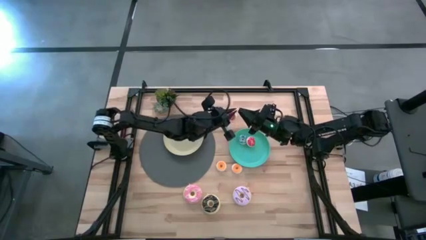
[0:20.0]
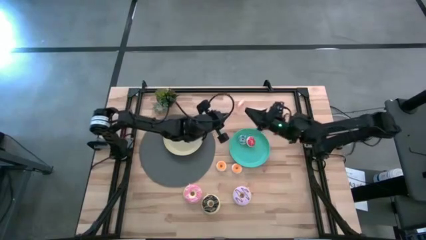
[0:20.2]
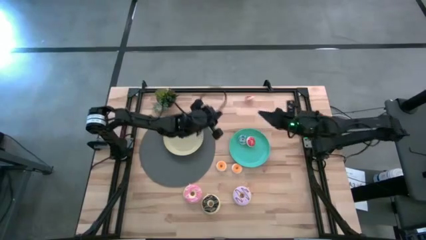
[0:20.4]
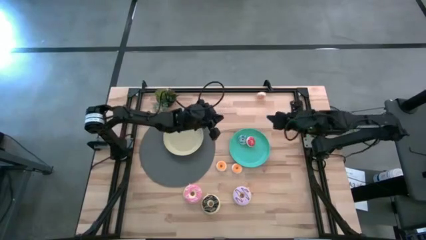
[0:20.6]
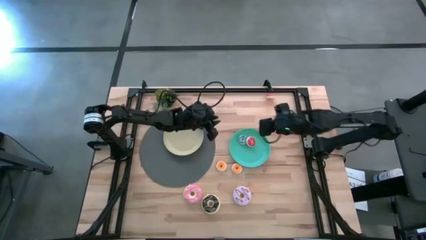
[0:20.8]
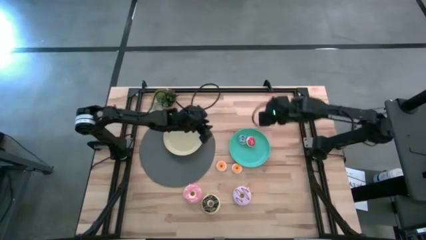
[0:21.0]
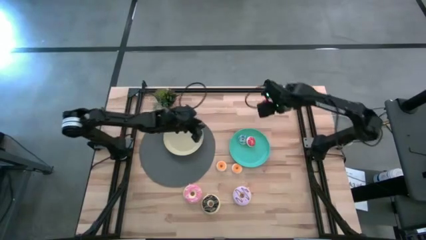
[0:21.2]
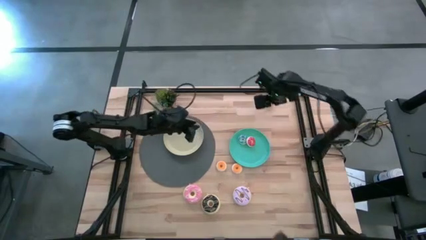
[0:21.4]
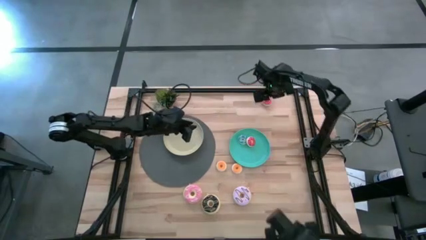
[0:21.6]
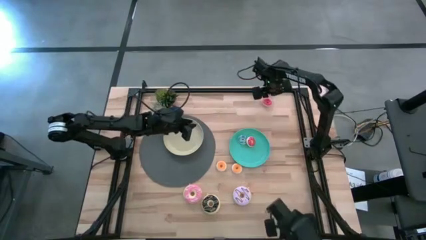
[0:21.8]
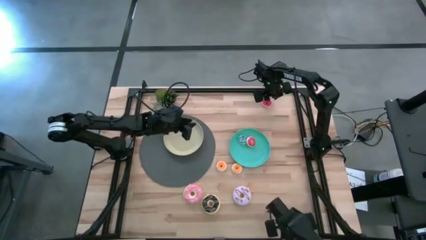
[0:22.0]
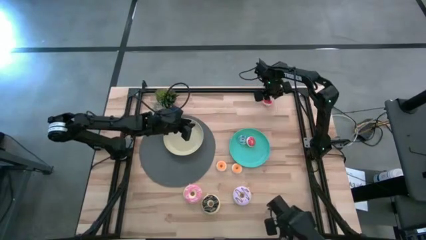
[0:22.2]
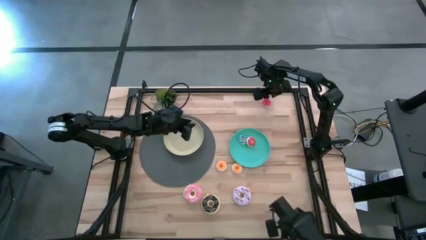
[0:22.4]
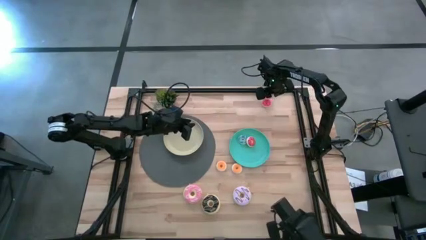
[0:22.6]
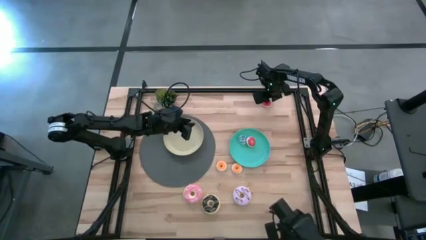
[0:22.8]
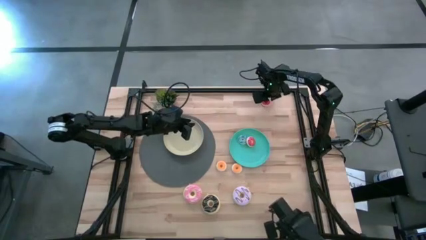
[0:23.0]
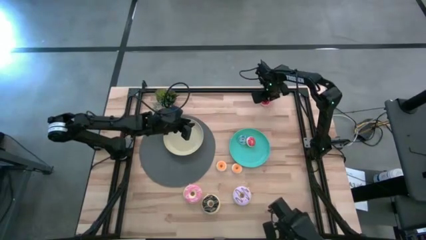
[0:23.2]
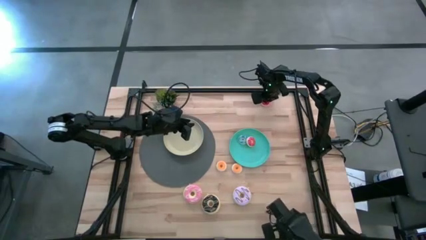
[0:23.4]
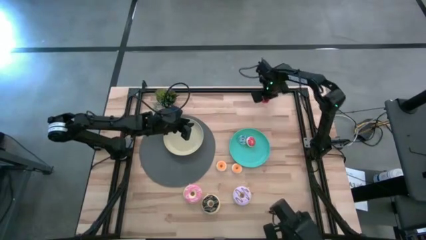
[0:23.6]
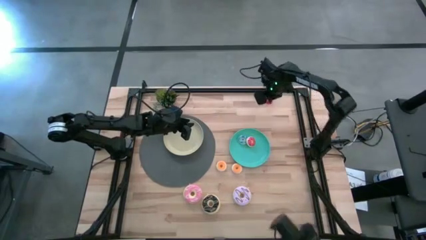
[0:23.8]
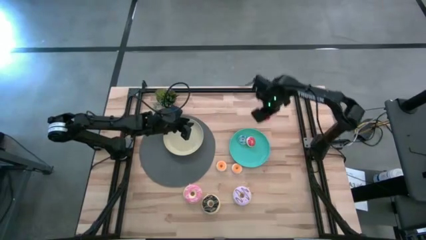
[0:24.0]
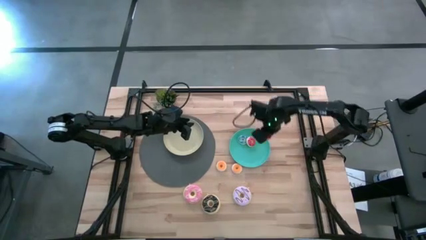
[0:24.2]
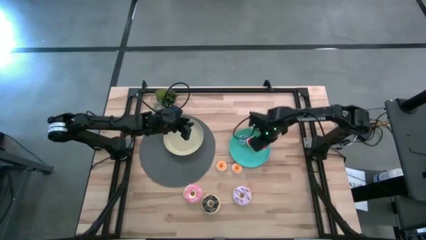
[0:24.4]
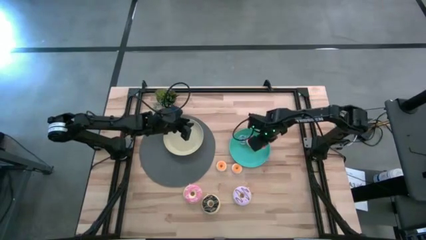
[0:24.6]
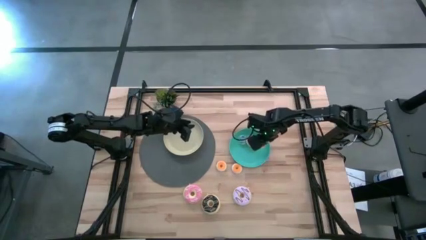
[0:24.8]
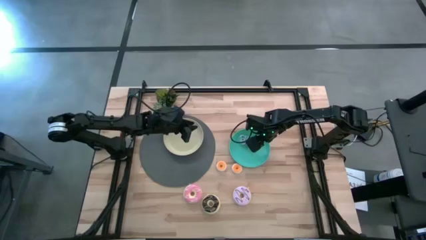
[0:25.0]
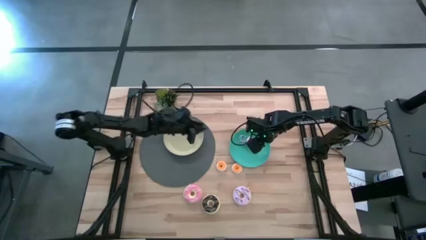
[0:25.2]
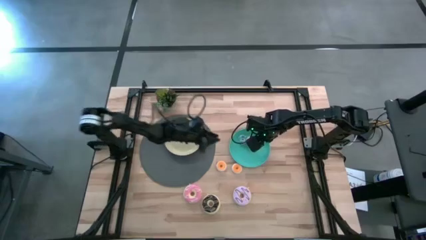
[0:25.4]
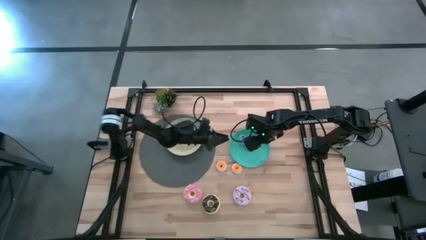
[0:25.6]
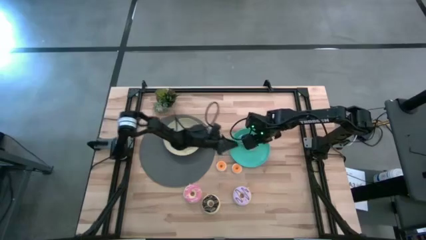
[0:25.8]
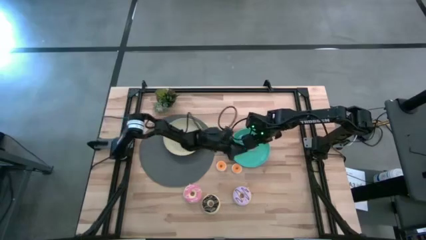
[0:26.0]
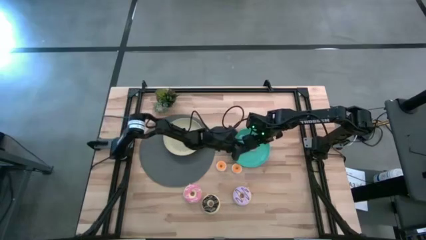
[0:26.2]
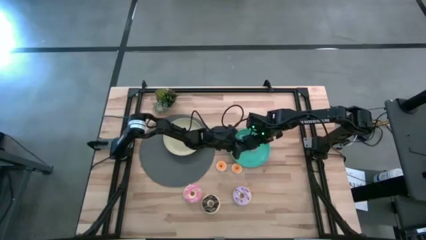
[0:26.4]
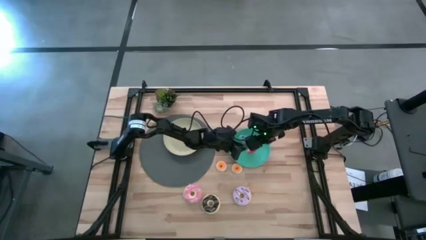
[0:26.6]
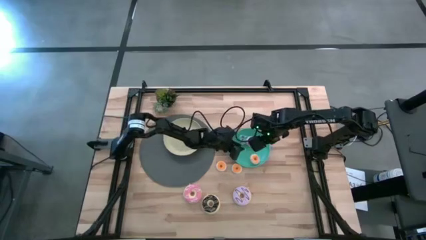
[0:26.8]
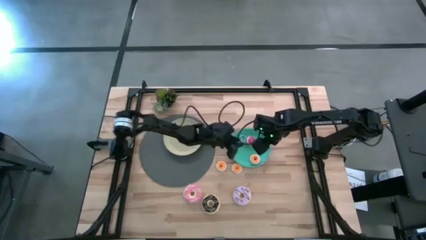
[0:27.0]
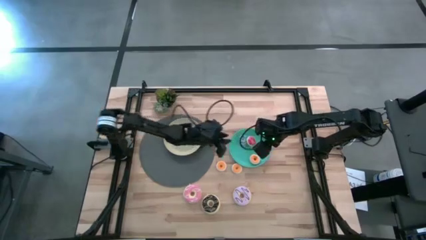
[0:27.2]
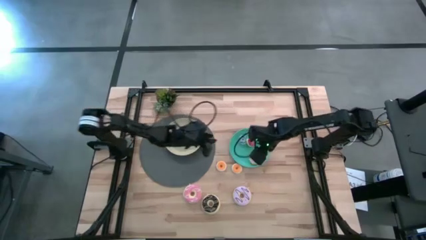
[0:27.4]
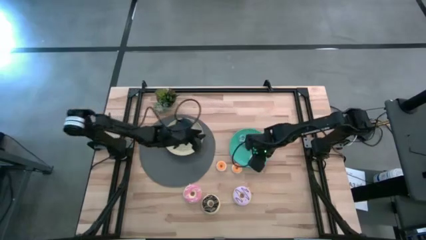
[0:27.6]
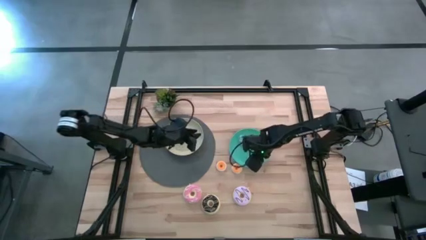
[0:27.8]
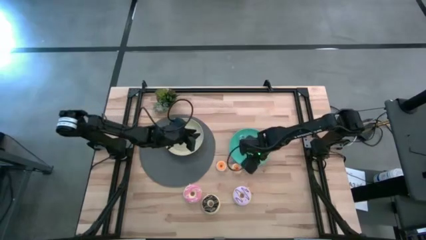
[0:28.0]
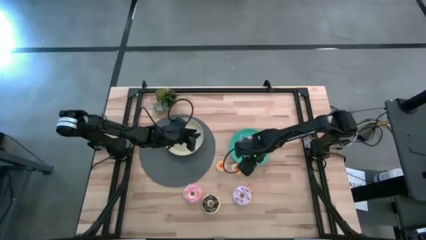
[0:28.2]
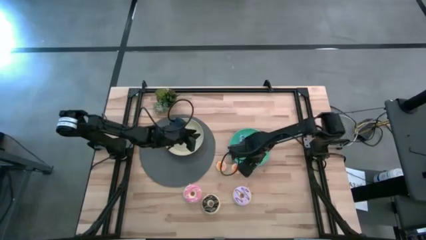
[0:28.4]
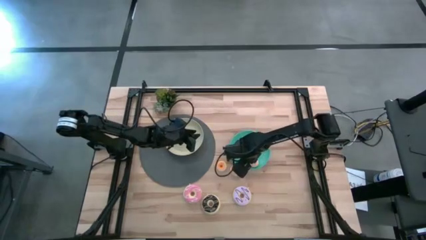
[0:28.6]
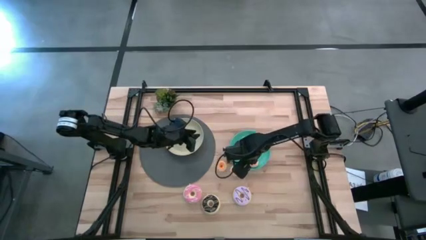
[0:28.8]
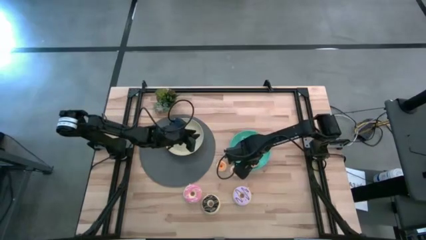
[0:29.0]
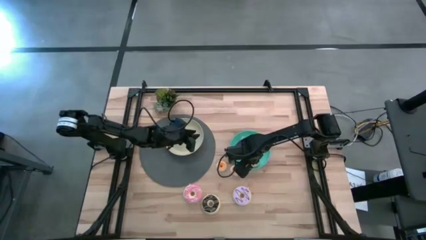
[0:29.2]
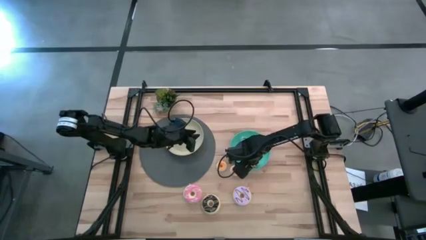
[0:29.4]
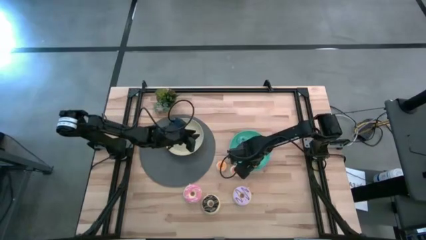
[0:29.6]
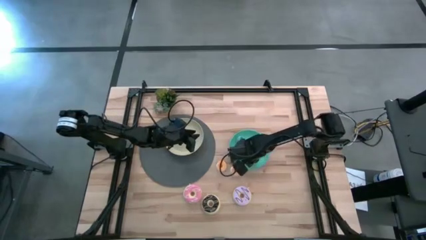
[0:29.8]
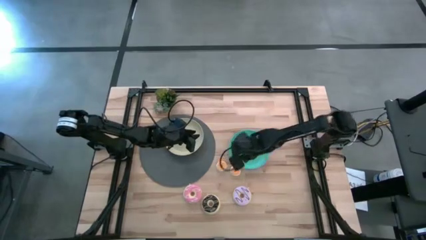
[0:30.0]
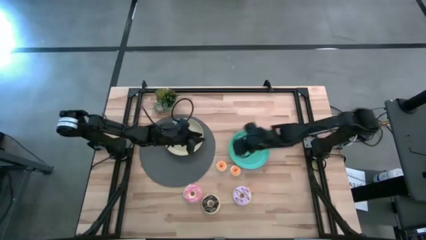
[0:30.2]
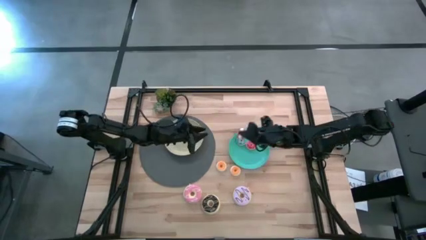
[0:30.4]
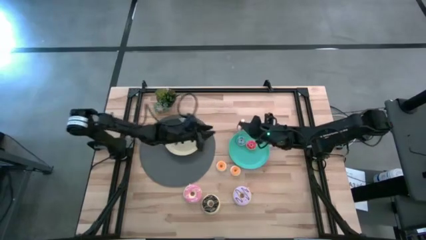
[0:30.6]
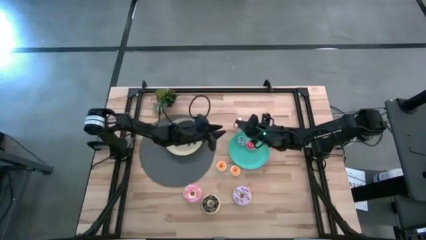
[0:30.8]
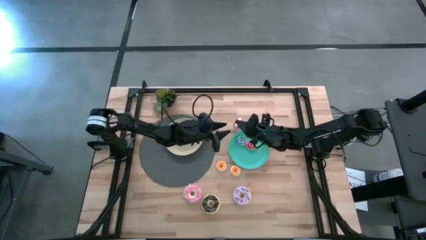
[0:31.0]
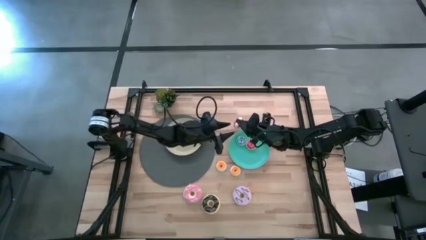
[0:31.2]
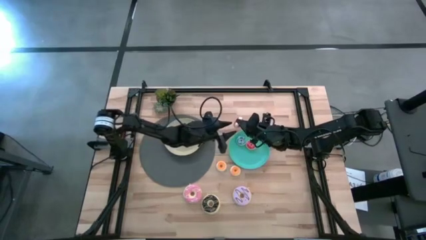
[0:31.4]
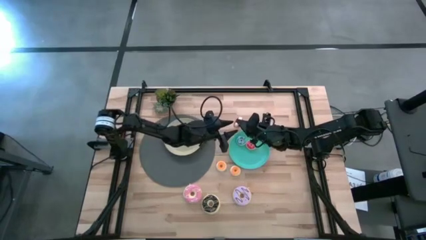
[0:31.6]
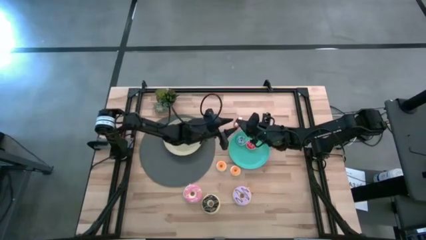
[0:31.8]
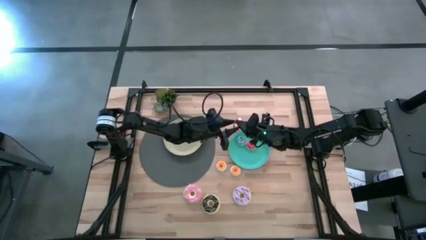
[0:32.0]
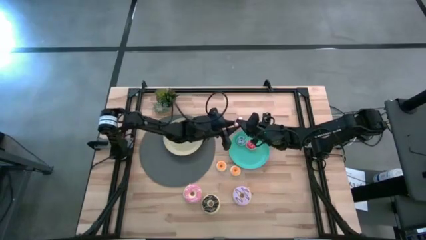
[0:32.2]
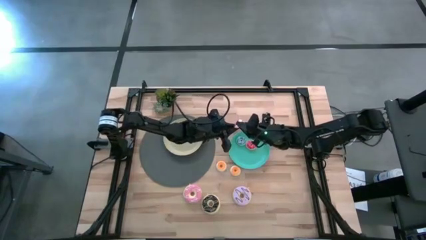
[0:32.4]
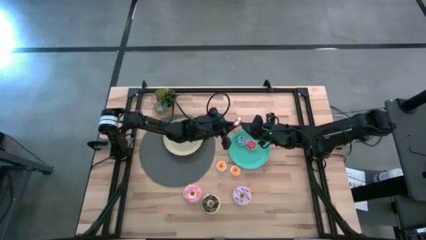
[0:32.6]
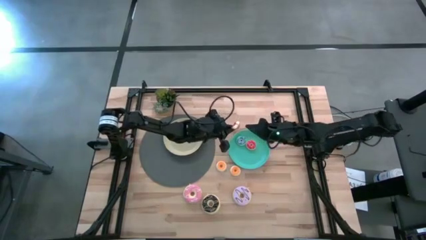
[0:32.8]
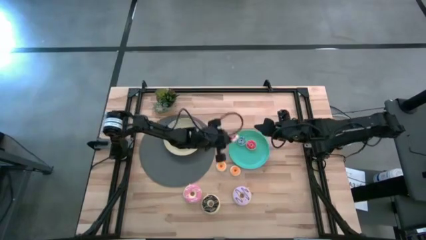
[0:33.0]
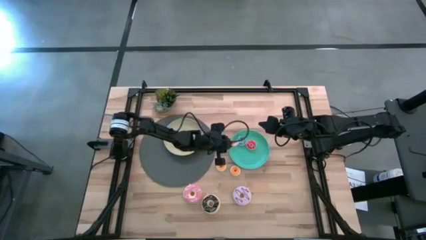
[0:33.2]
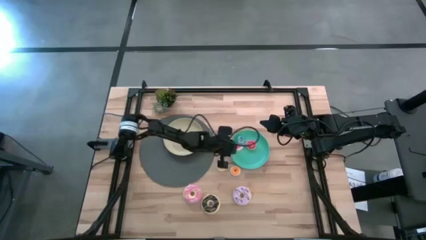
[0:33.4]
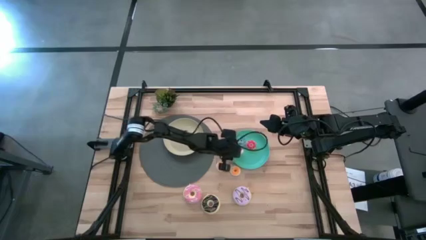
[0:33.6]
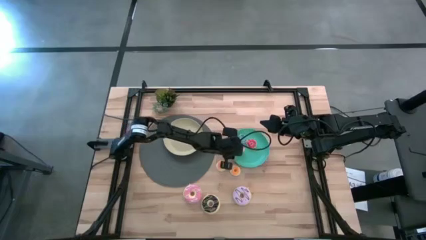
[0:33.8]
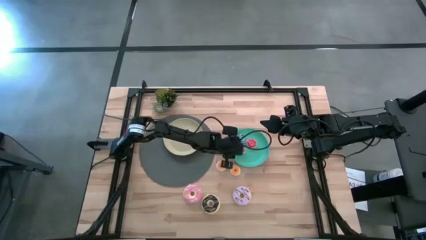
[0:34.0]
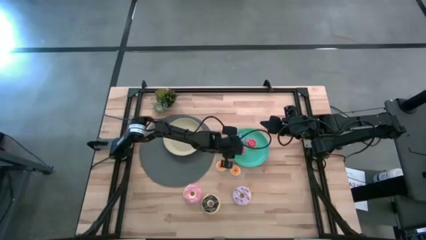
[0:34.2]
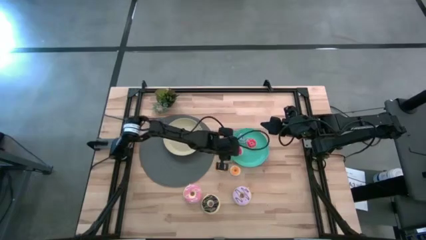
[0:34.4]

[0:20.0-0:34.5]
Task: Pick & Place donuts
Put the small right red donut on the light blue plate

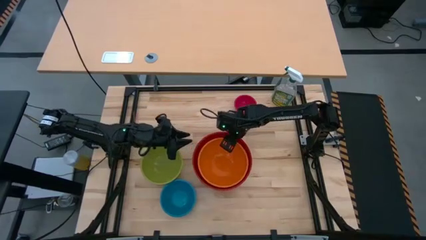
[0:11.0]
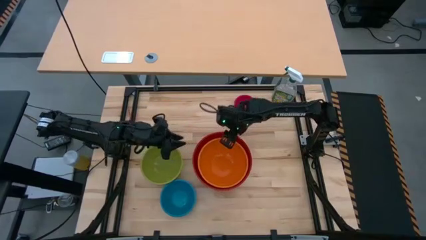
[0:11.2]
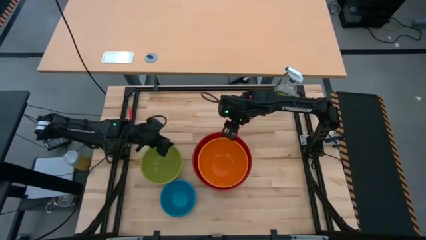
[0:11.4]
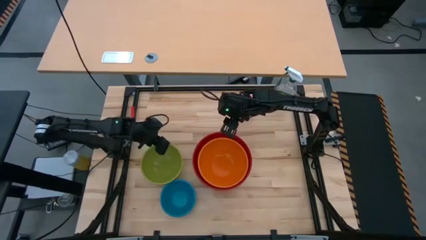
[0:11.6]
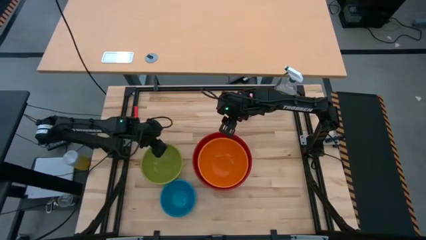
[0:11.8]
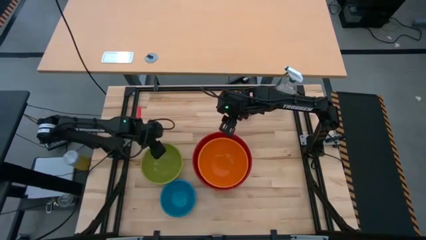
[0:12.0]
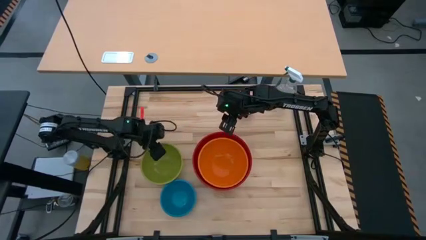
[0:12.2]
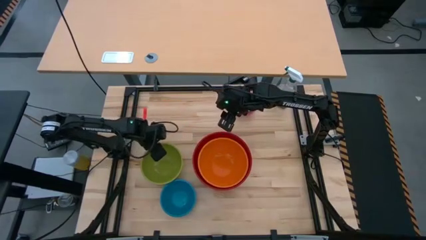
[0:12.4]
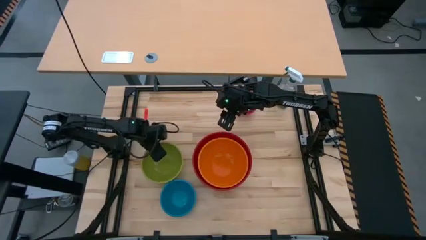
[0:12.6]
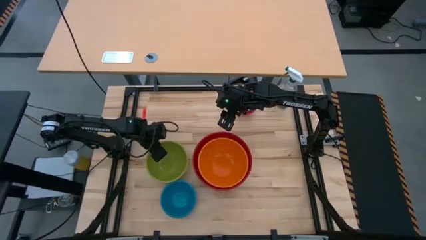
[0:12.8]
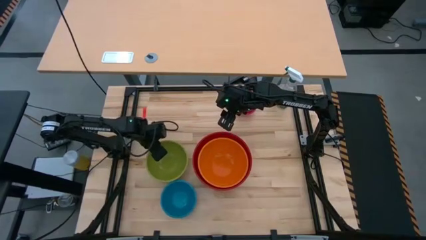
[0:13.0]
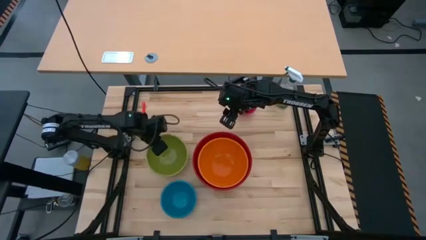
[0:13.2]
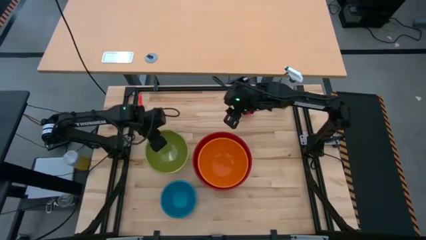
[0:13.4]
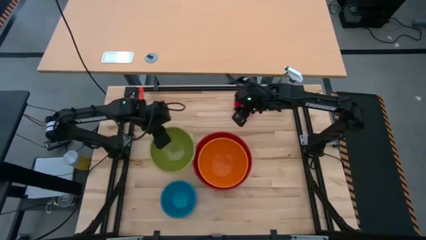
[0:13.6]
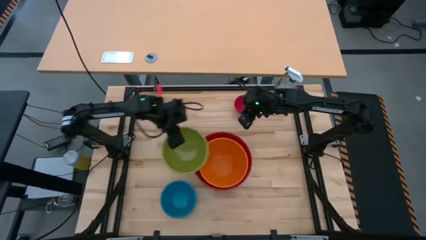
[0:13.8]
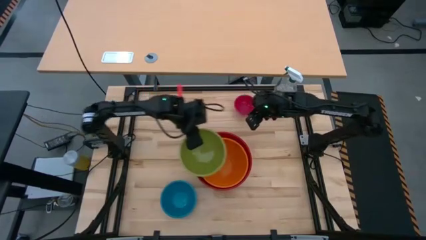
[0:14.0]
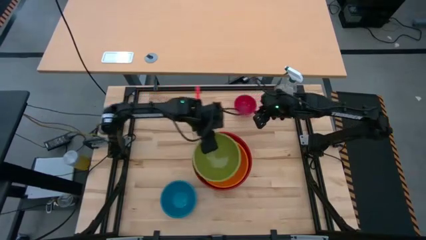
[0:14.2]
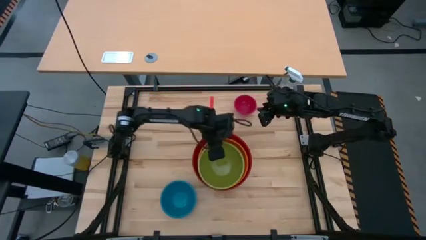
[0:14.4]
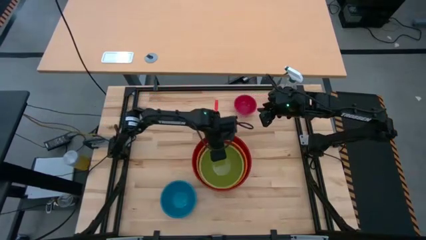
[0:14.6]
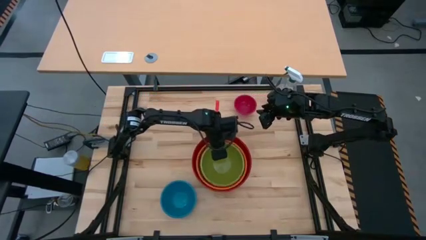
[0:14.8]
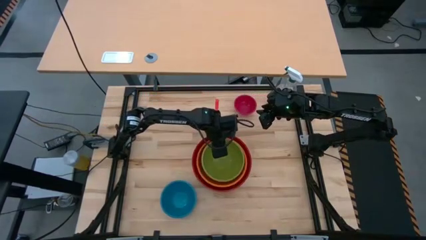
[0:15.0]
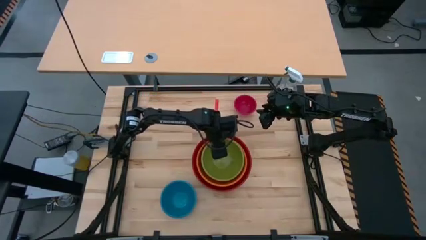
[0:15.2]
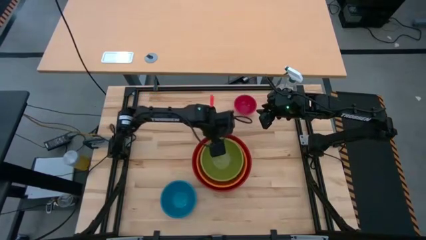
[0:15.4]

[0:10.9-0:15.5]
Task: Nest bowls inside each other by size order
Stack the green bowl on top of the orange bowl
